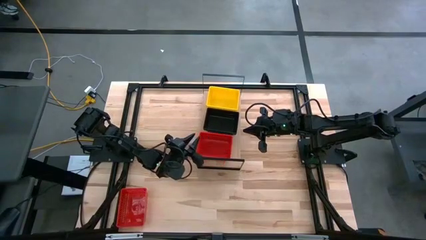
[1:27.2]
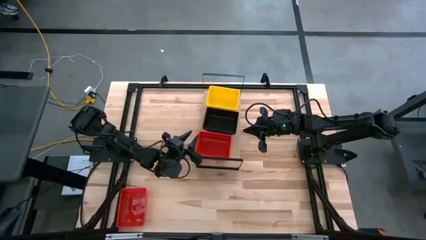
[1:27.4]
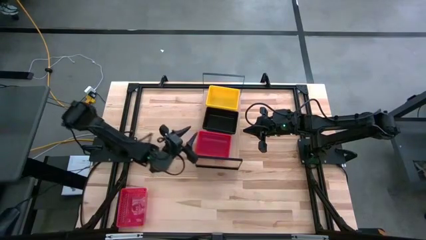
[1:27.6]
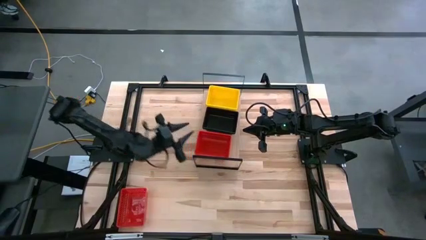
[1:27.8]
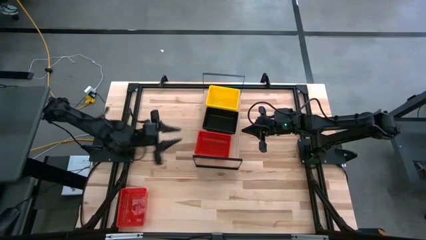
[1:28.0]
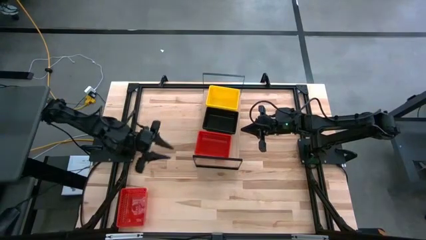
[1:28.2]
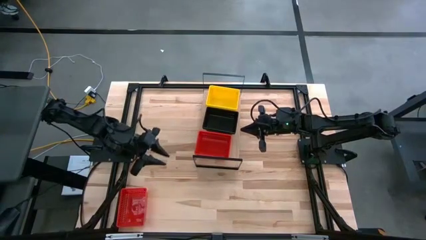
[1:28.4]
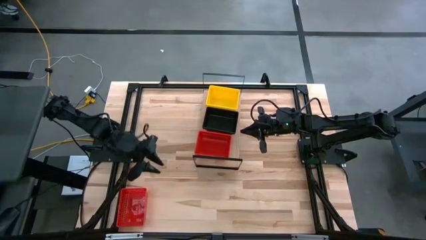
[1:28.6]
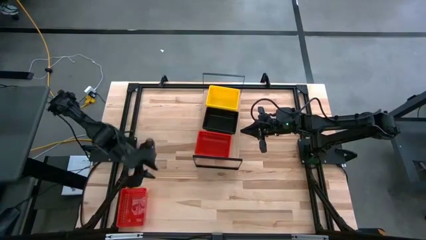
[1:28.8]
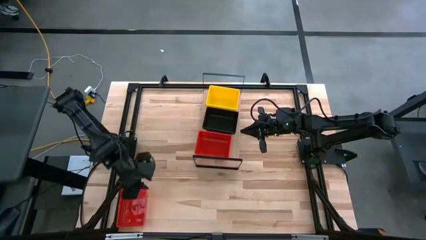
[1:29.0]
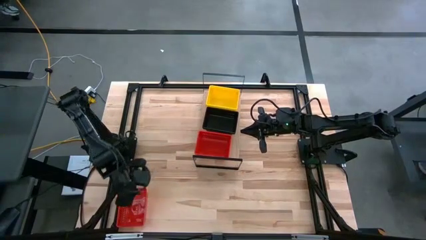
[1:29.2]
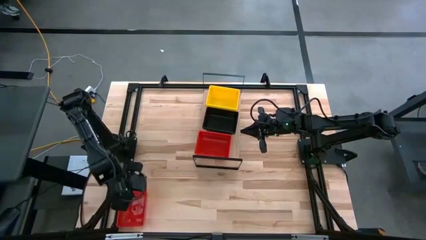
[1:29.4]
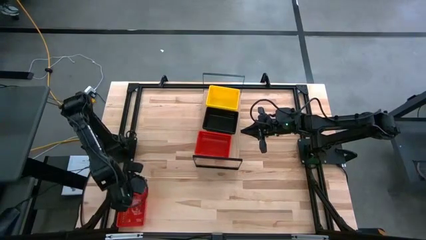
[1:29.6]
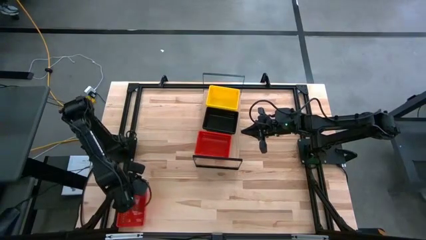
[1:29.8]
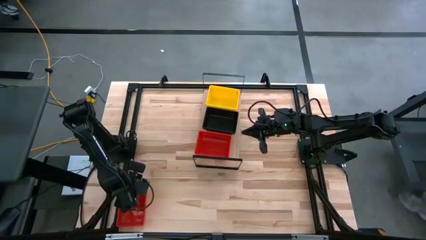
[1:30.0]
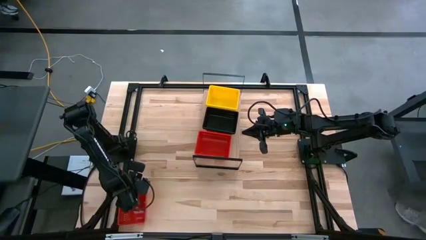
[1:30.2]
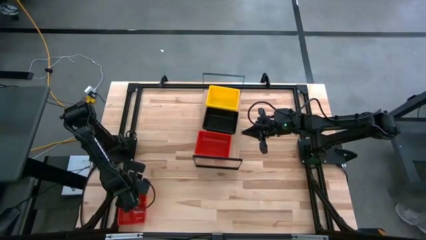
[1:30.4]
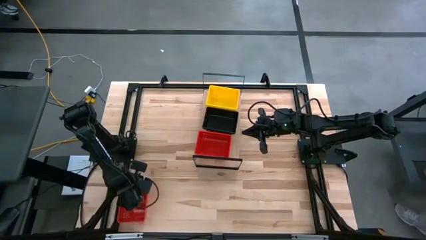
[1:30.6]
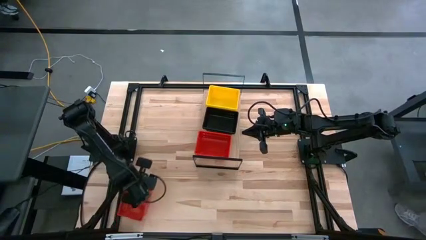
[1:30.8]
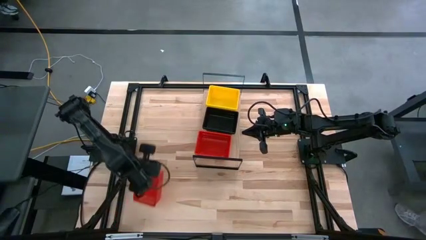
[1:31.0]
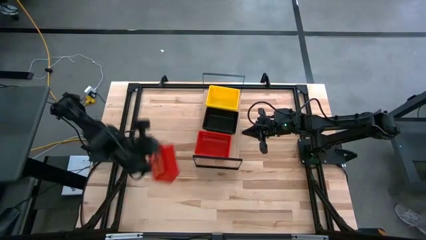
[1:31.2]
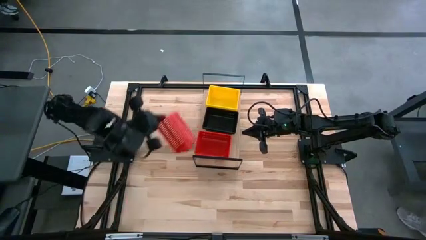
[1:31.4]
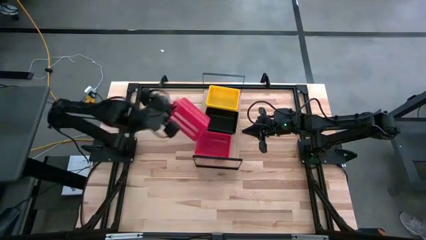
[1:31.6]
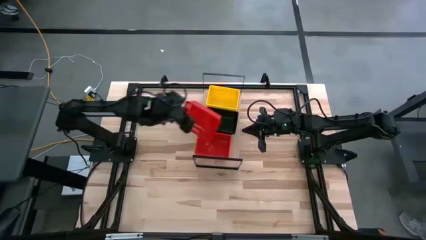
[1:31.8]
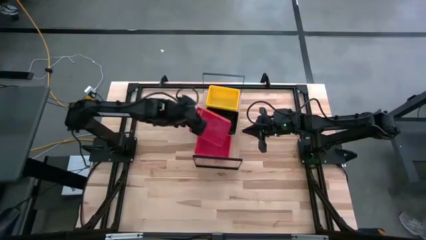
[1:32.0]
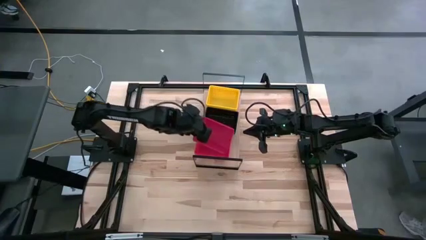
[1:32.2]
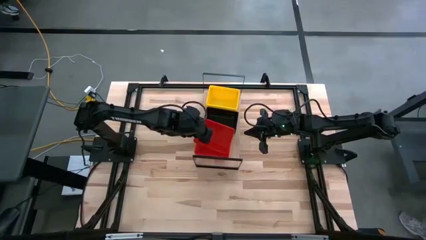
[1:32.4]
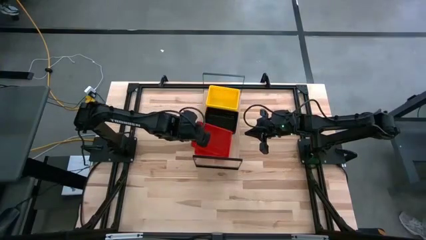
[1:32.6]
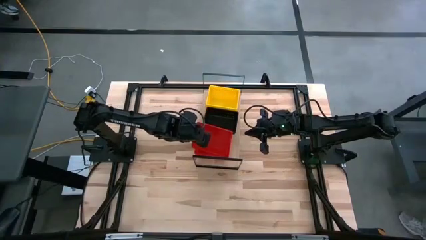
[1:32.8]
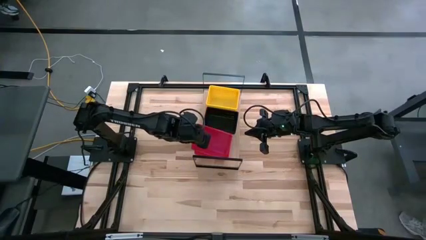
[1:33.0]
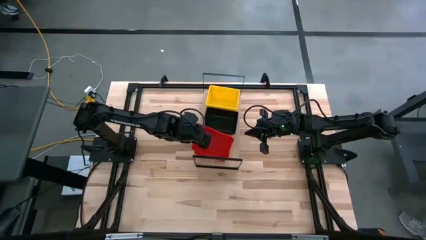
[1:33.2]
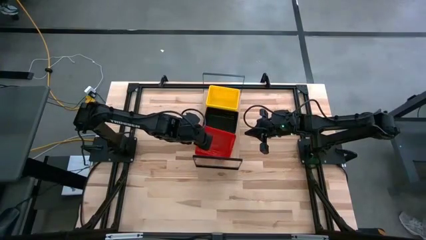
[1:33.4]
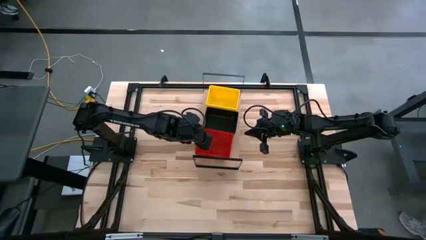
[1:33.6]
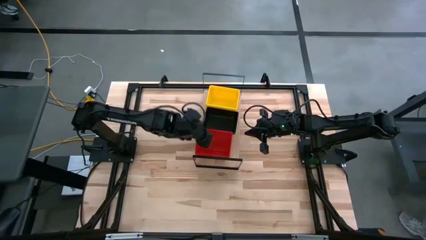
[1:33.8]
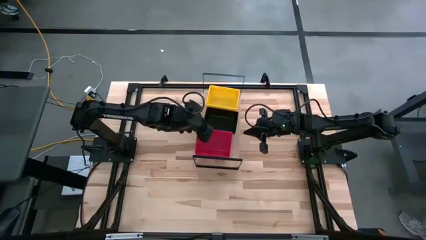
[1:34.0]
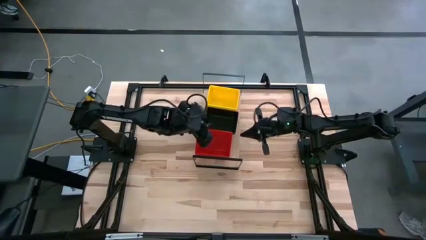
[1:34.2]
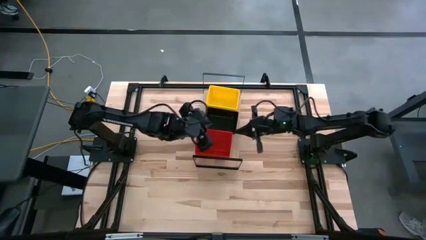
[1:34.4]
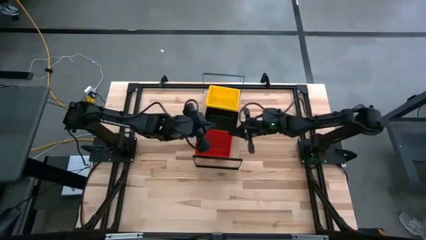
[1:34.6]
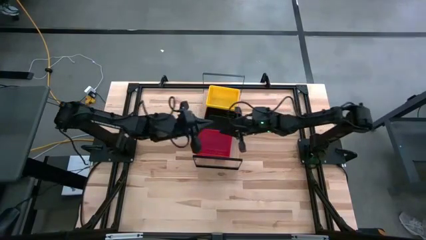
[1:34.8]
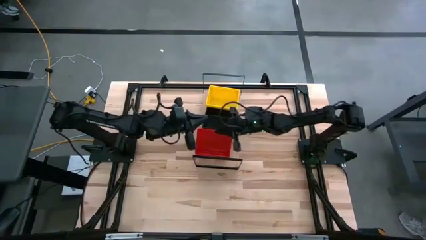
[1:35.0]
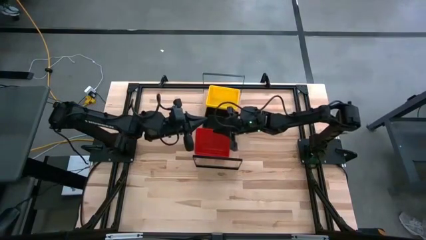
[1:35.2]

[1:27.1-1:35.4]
Task: Stack baskets on shelf by color
Stack the red bin on the red bin on the shelf

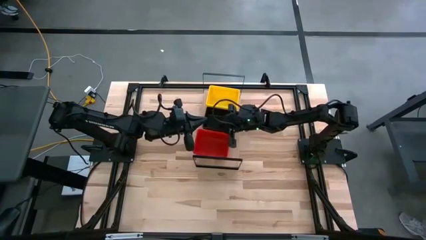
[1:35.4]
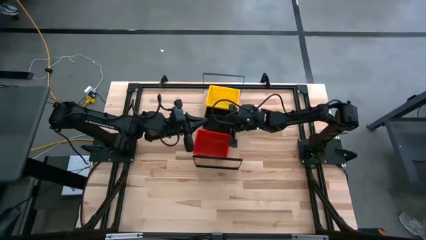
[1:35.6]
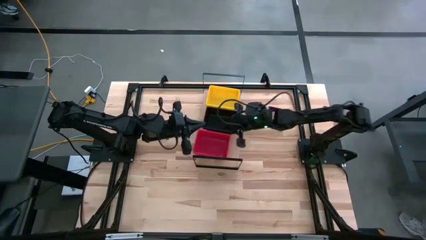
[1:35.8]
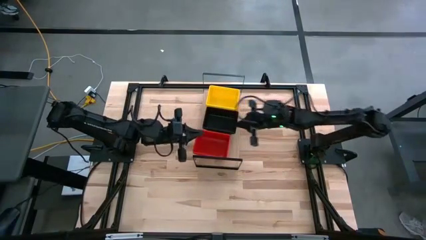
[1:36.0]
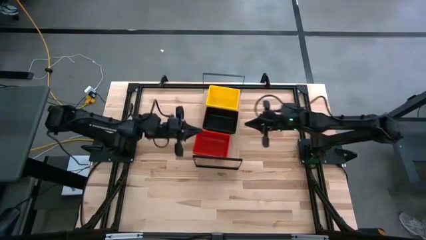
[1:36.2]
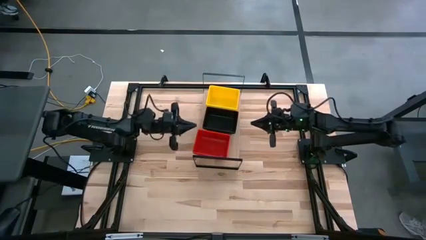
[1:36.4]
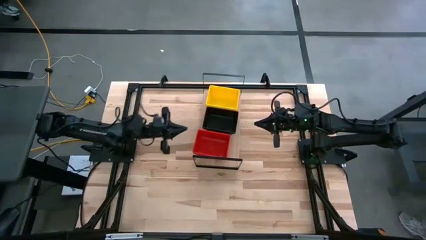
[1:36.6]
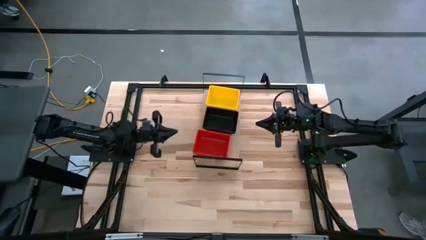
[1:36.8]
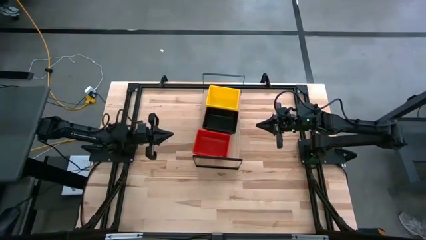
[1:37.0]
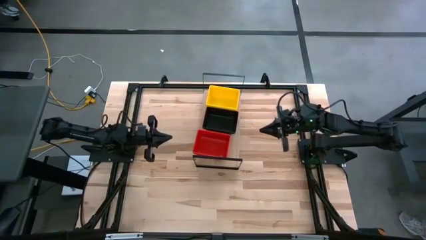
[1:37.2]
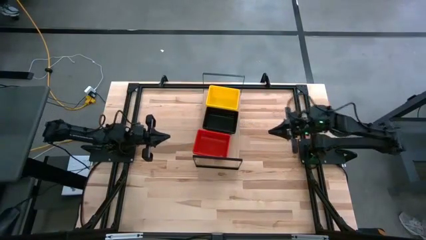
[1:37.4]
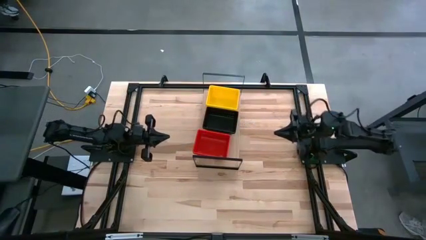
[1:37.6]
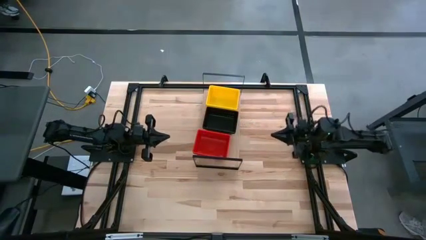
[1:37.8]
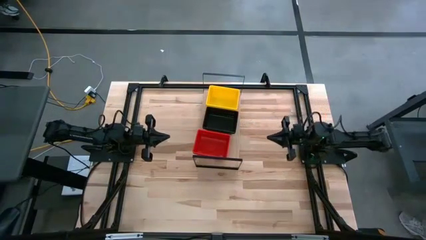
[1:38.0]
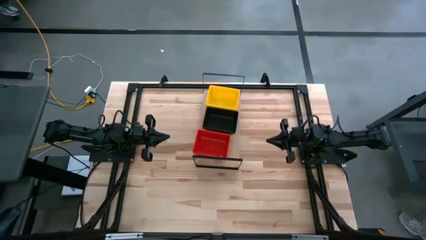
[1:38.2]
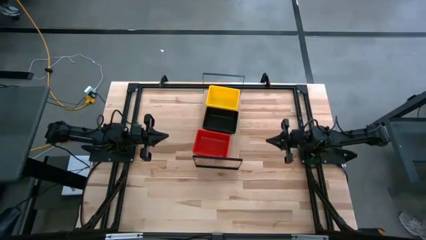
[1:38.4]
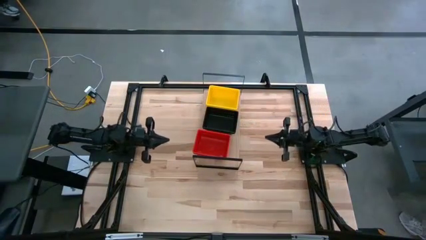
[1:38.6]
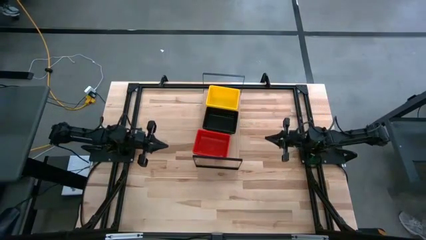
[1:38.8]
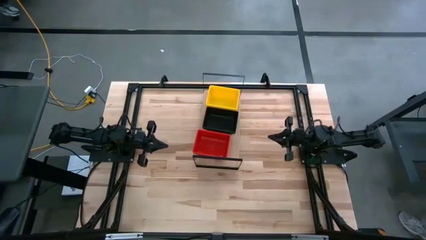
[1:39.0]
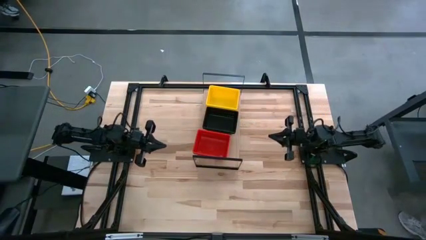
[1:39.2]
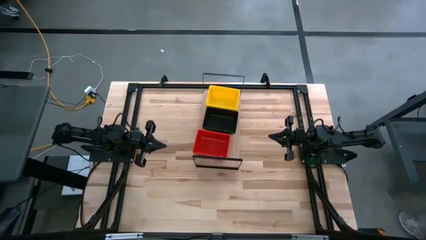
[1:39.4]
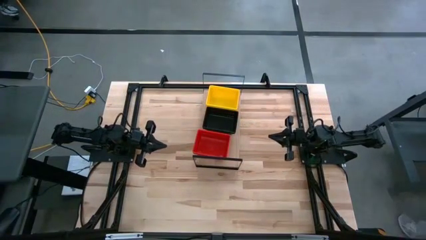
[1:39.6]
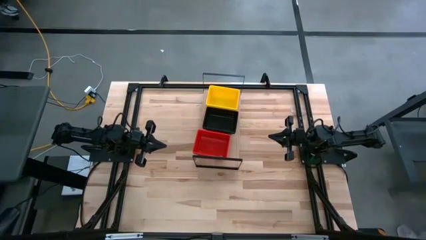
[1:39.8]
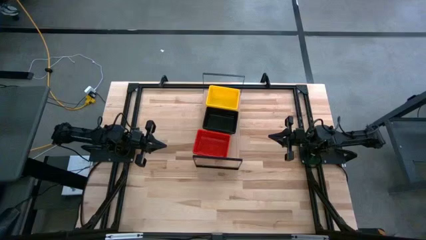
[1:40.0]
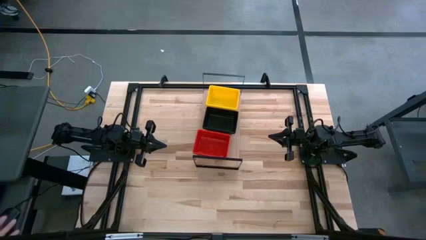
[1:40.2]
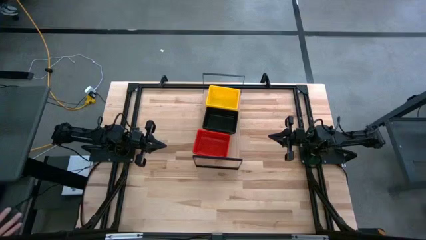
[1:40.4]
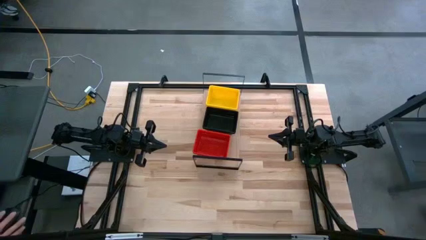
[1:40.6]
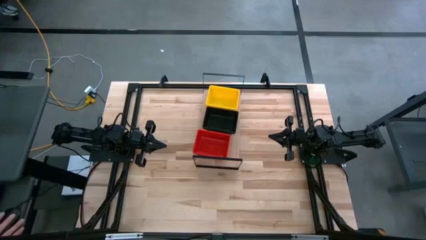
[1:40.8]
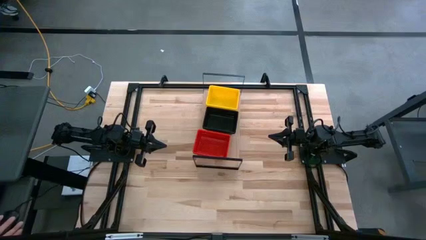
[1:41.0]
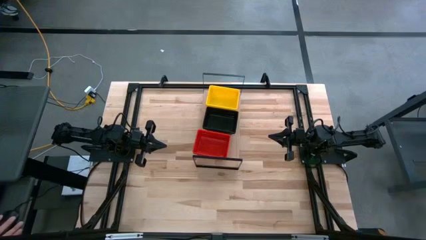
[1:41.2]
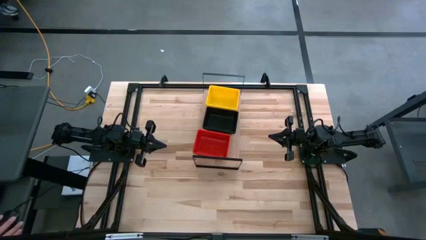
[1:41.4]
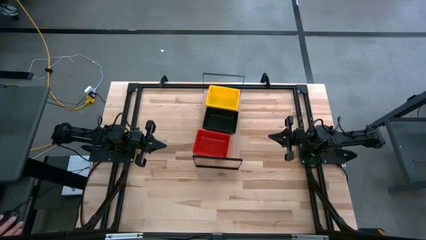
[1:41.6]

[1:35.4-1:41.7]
Return to Home Position

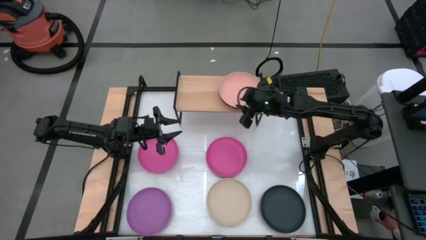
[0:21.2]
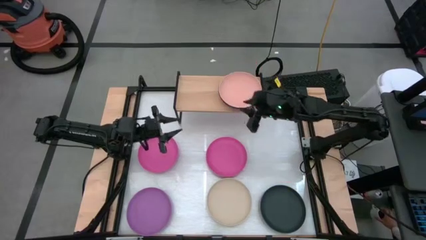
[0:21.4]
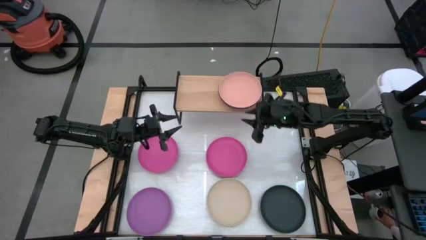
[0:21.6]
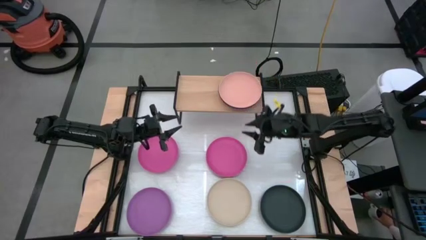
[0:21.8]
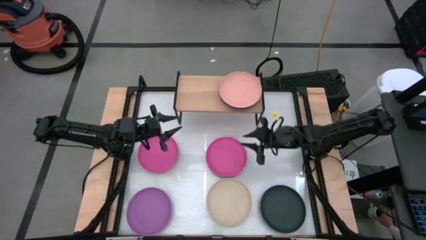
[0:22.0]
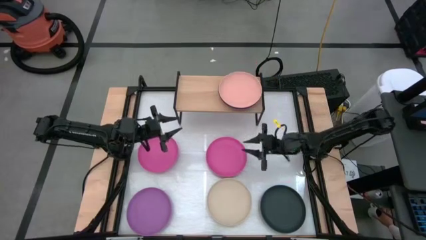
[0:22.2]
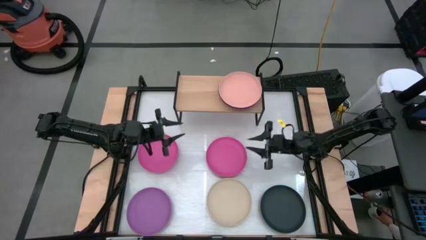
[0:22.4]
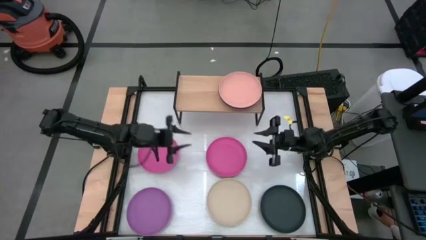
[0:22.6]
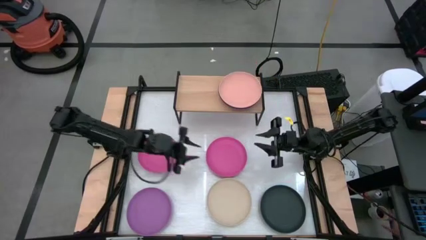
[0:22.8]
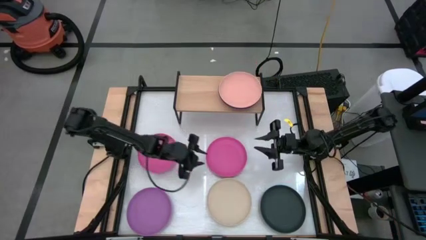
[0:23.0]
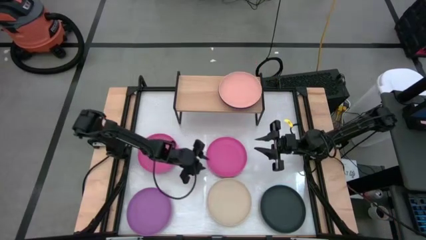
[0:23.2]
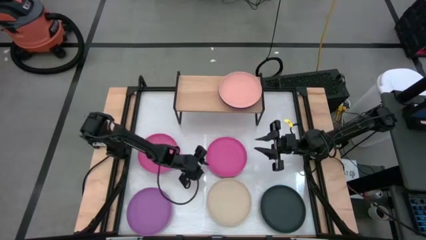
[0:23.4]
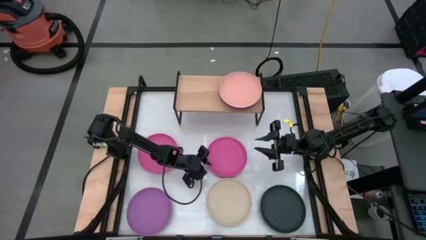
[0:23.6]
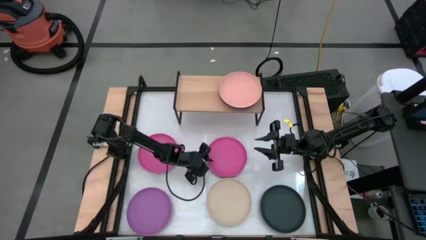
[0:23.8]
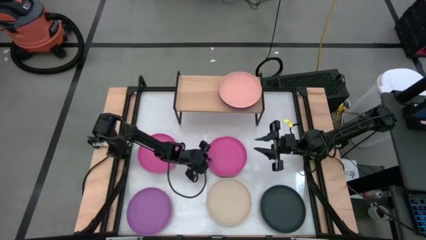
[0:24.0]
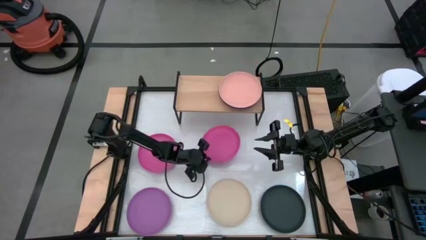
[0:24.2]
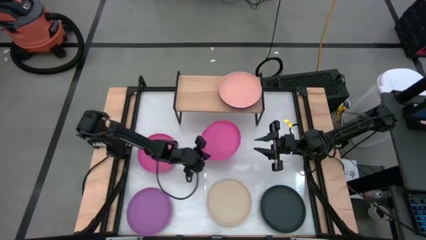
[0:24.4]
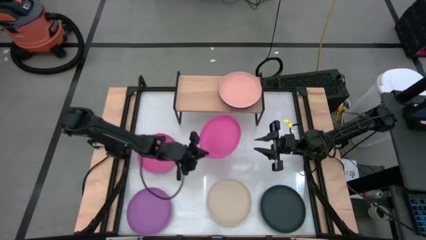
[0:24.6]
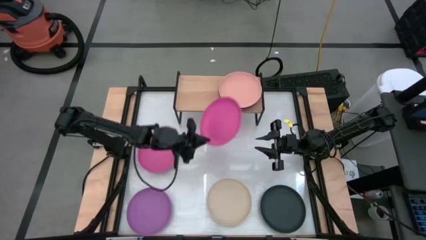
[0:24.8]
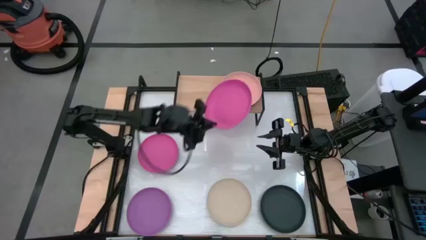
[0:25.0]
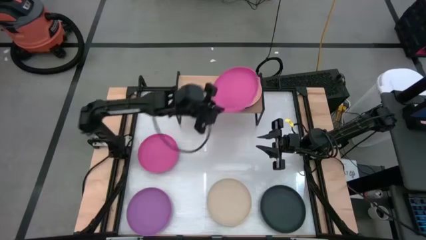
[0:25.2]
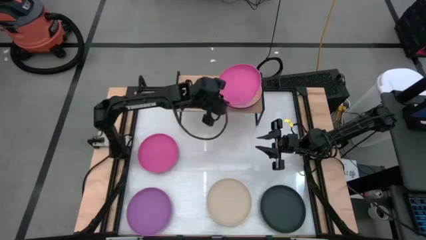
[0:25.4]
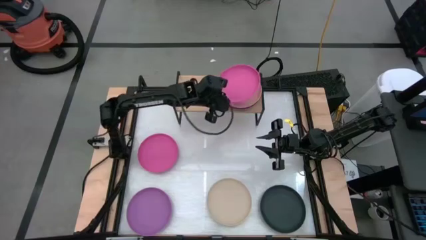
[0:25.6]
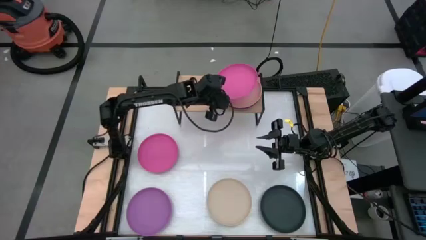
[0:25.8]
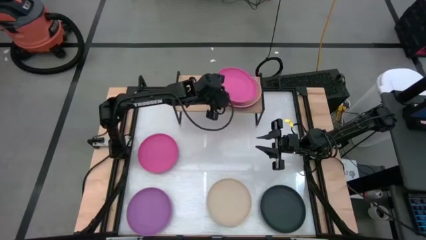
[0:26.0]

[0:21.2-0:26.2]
Task: Place and stack plates onto a shelf
Stack the right pink plate on top of the light orange plate on the shelf
